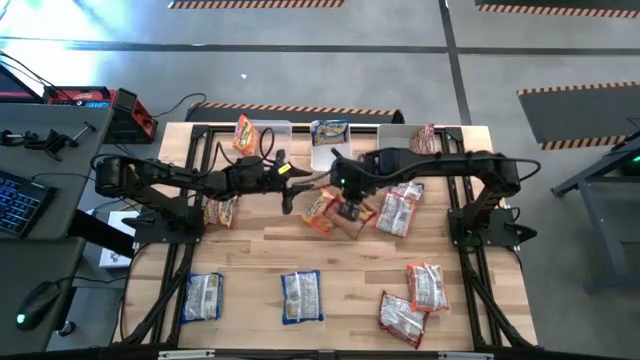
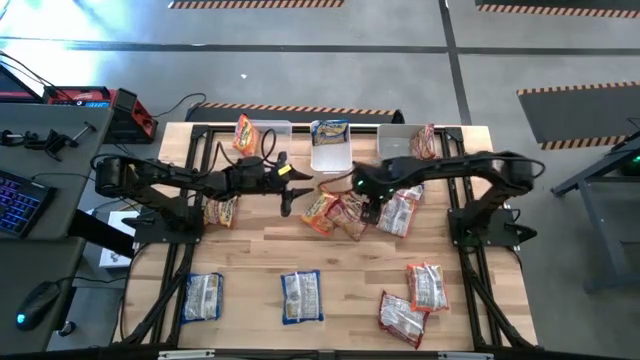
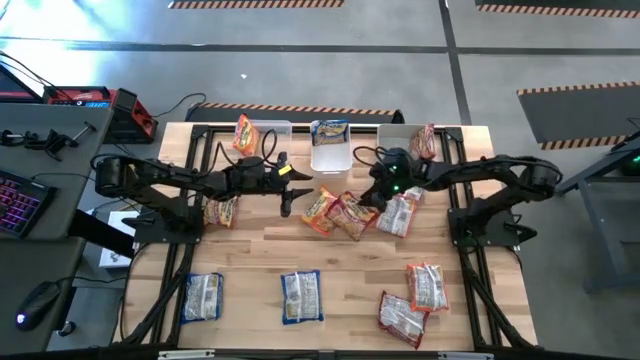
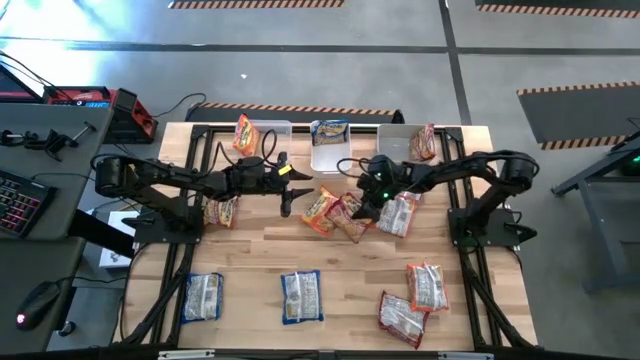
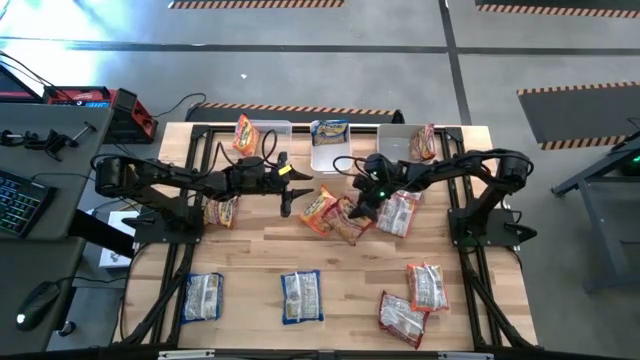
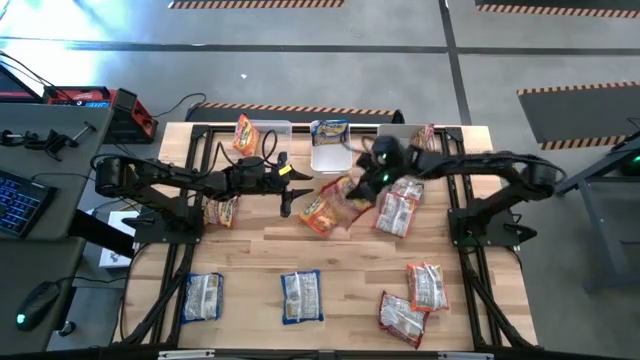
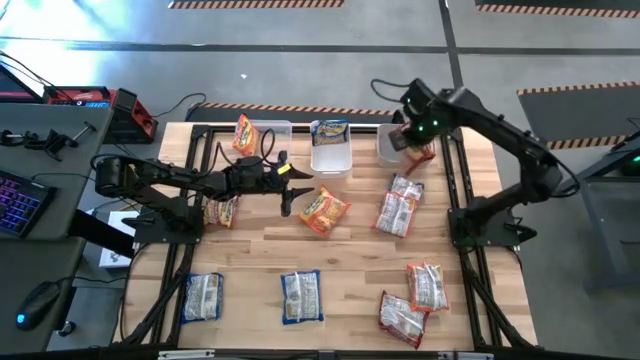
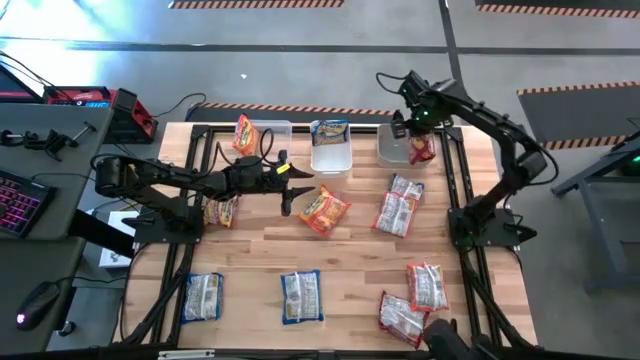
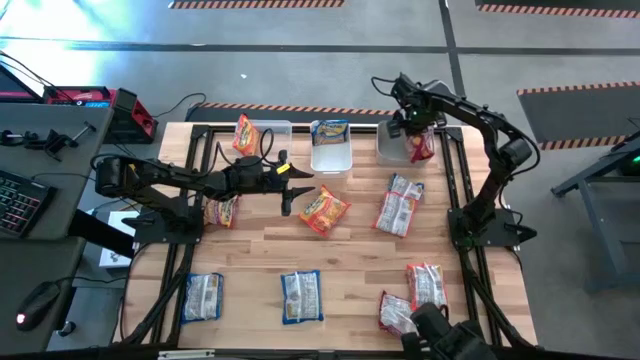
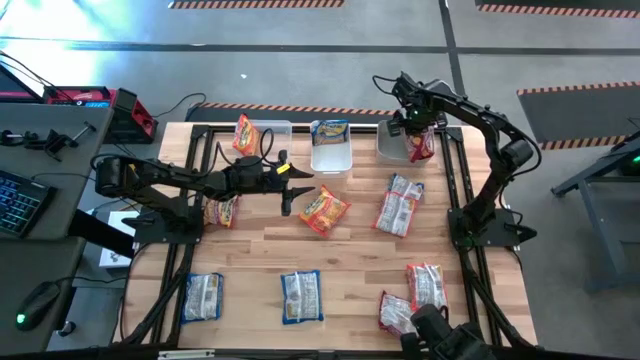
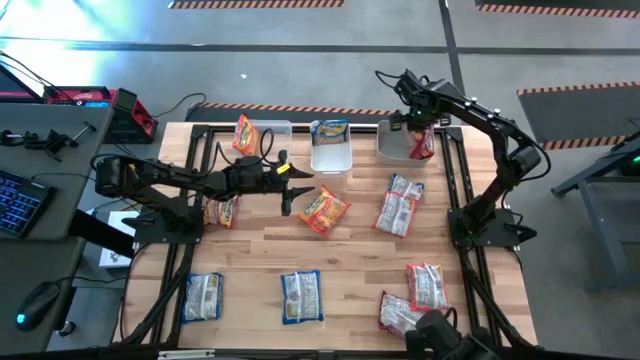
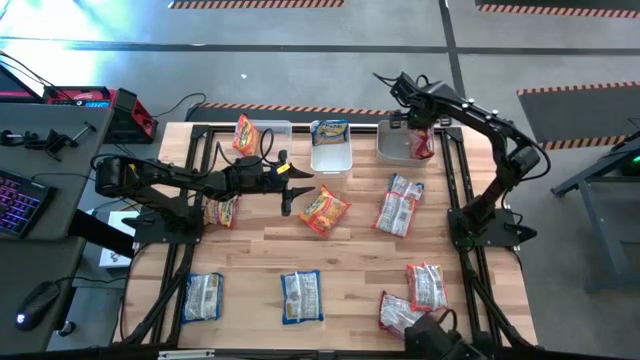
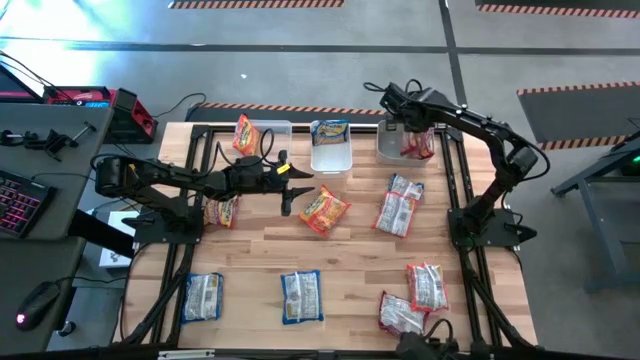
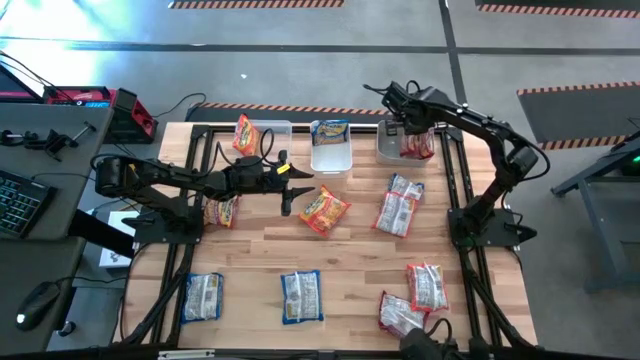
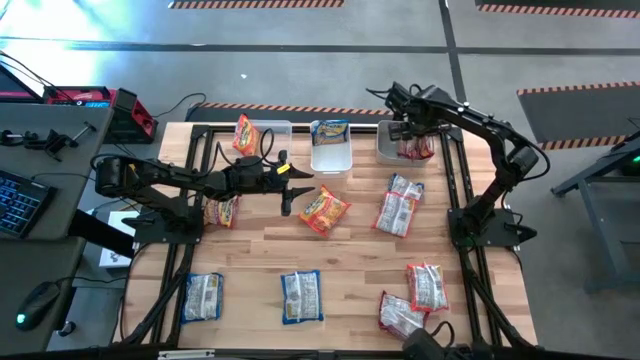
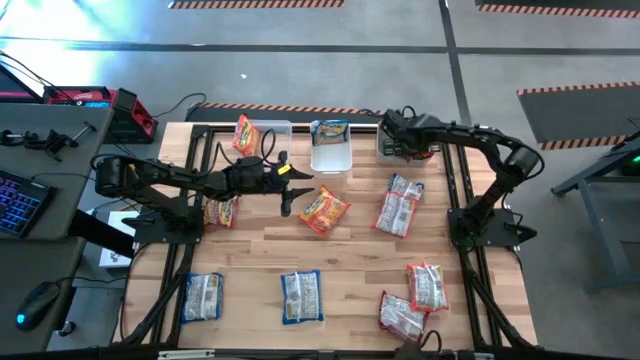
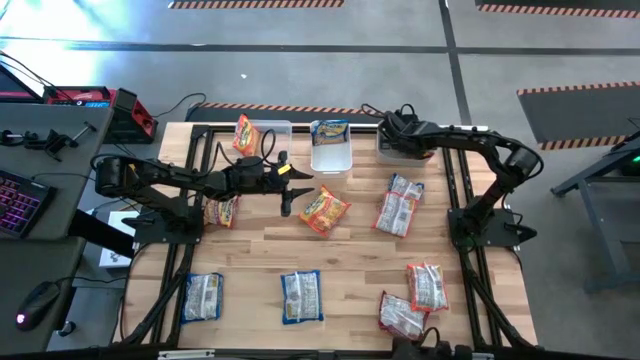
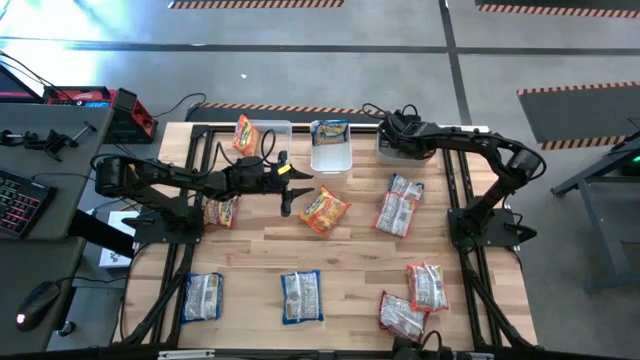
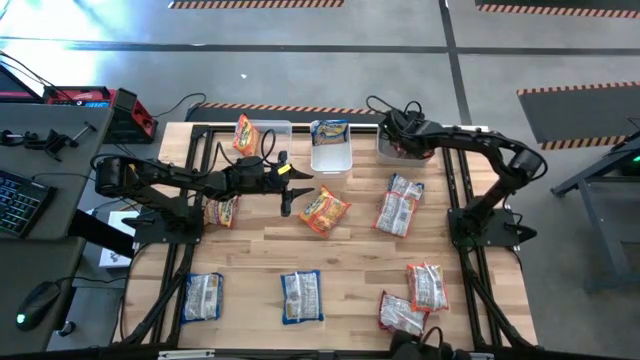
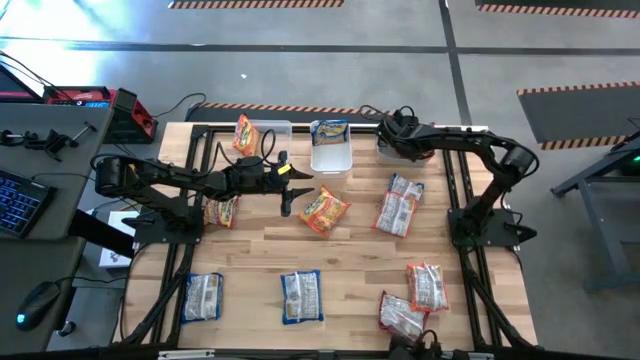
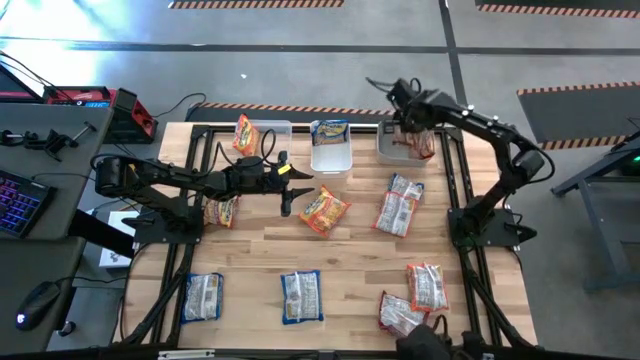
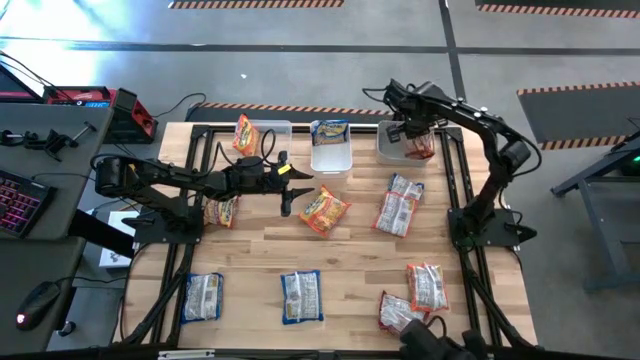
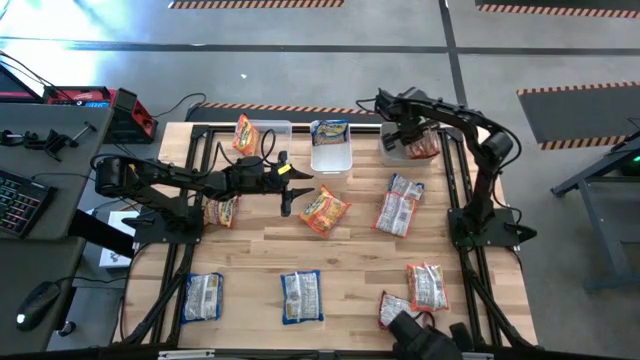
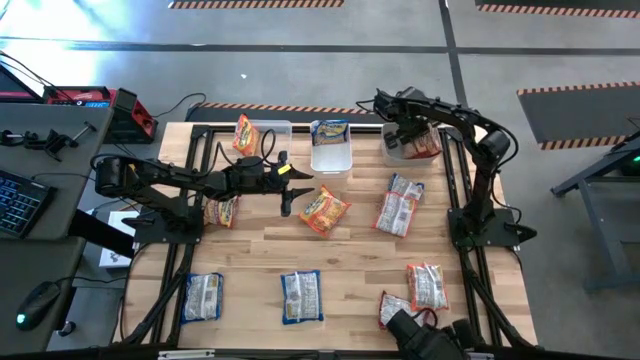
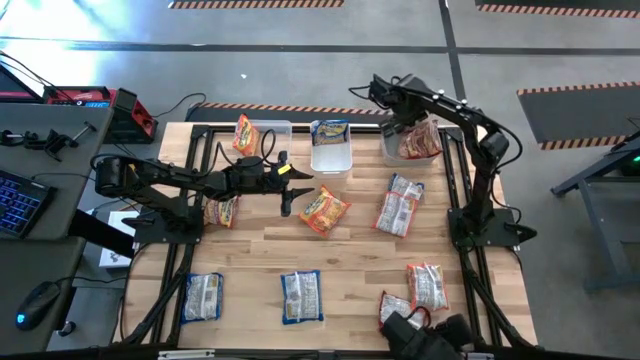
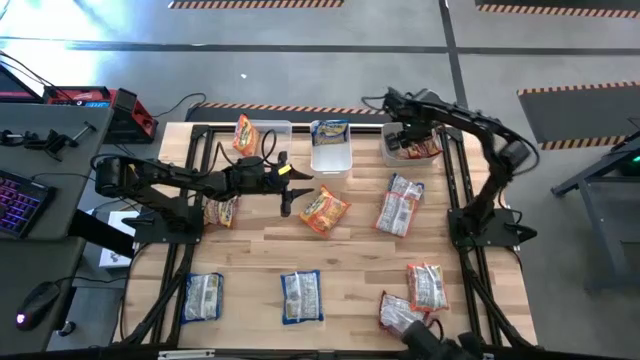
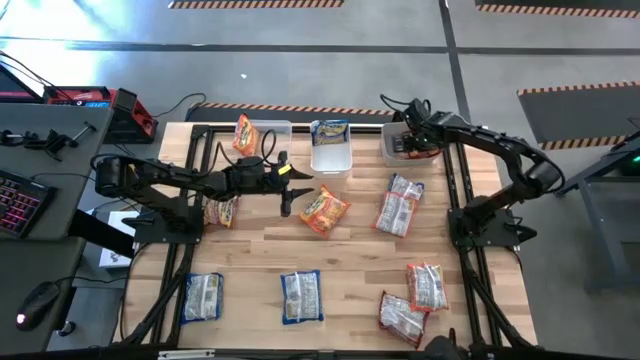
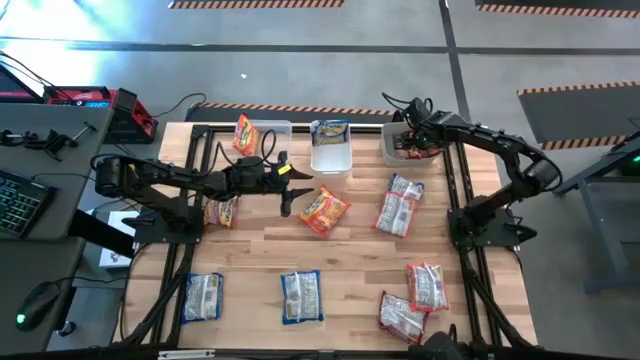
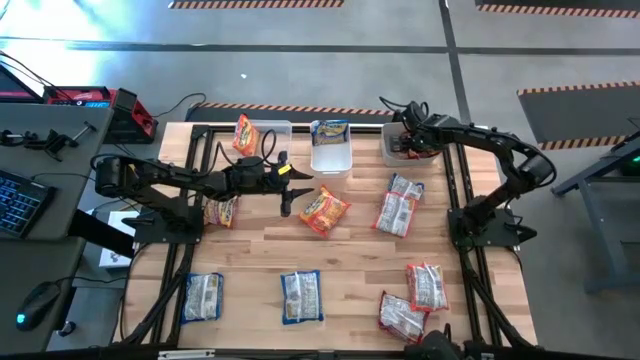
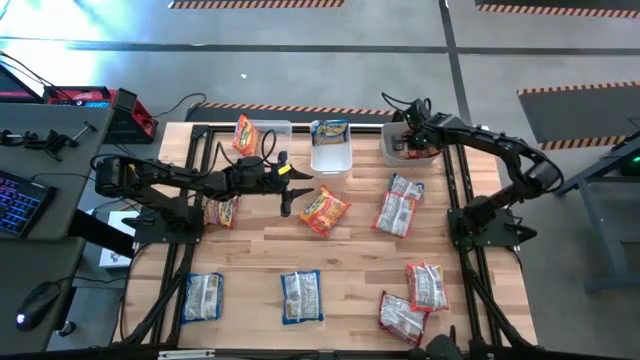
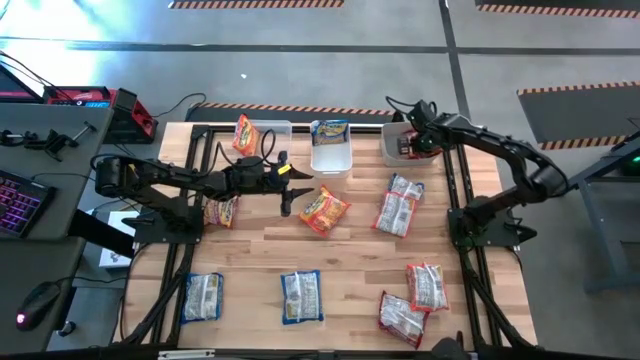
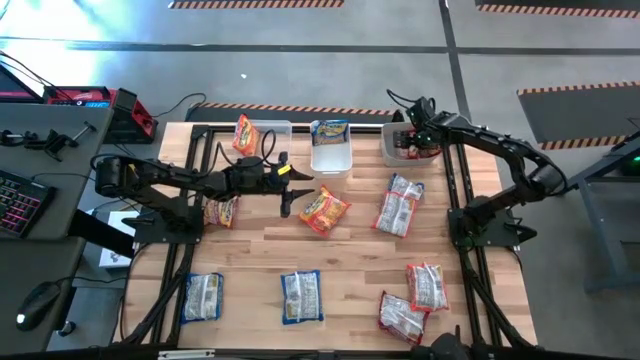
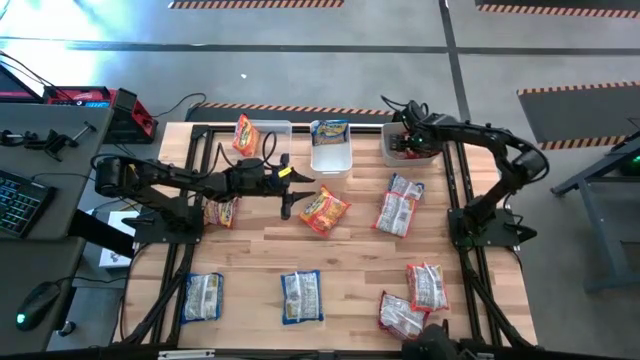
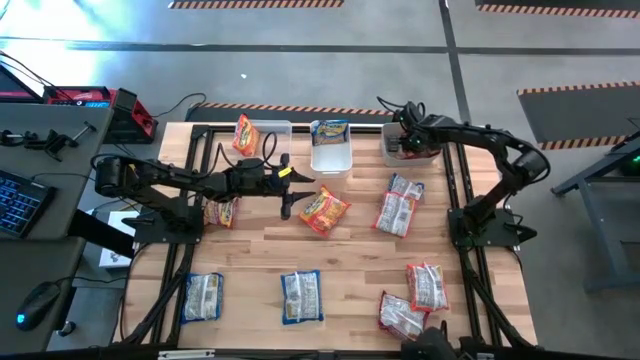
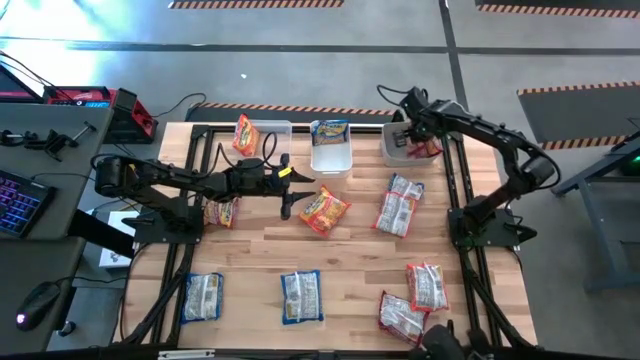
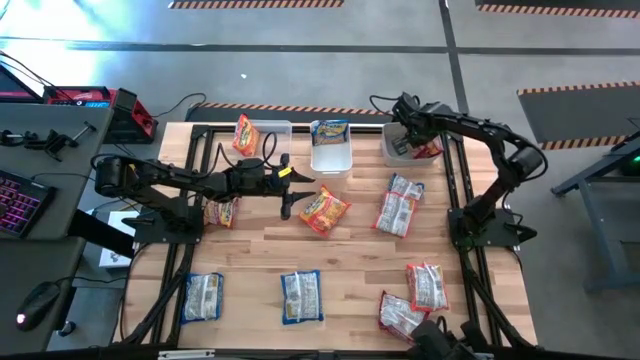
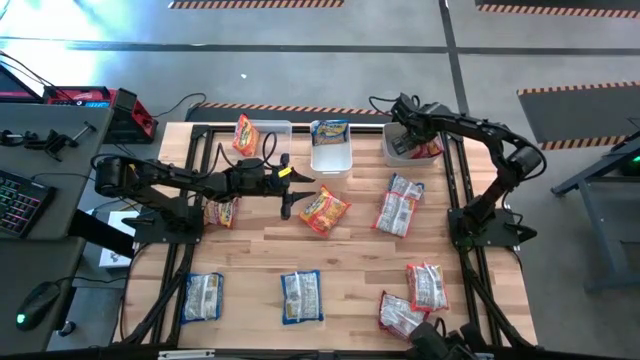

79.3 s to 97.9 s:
Task: Sort Maruchan noodles
Put the middle red noodle pack into the gray bin

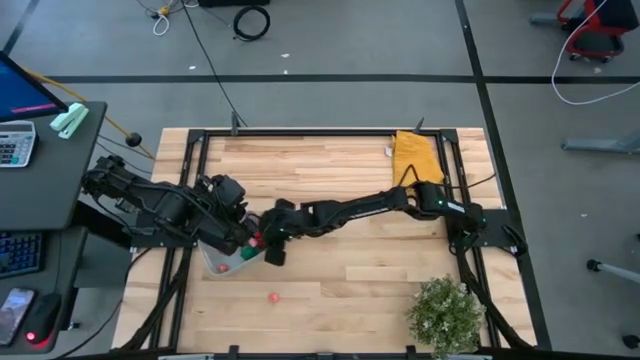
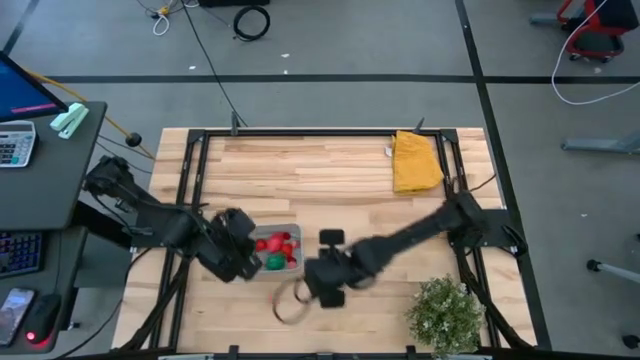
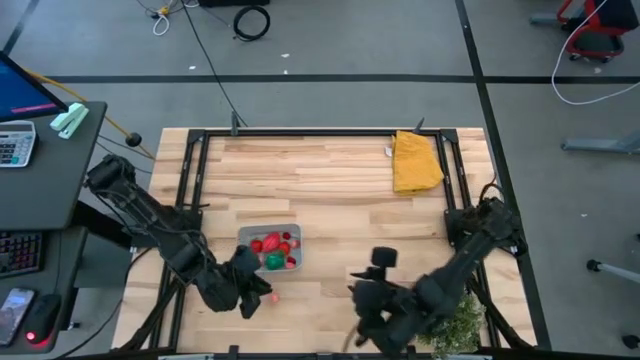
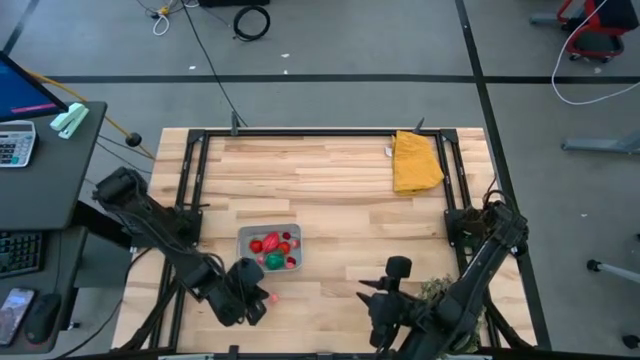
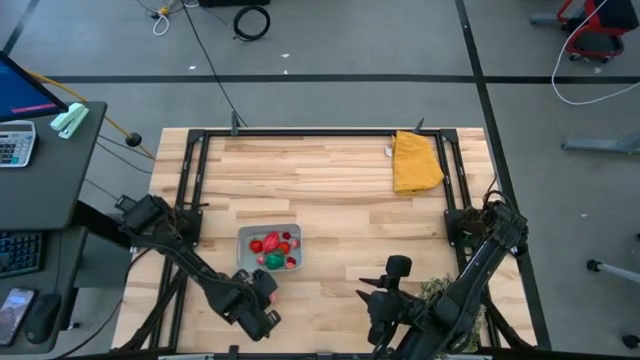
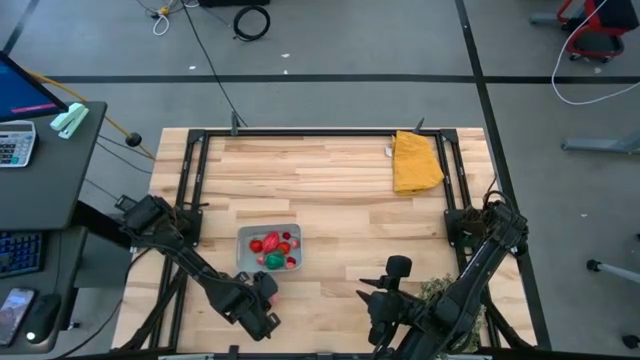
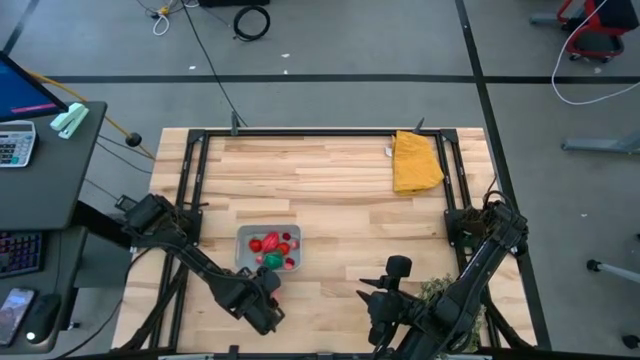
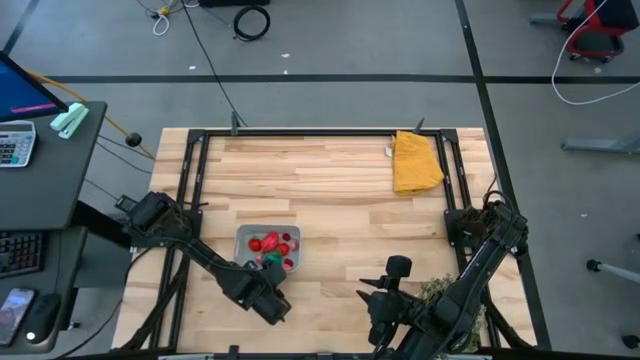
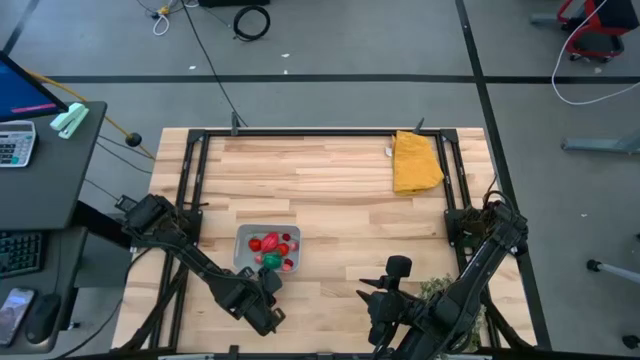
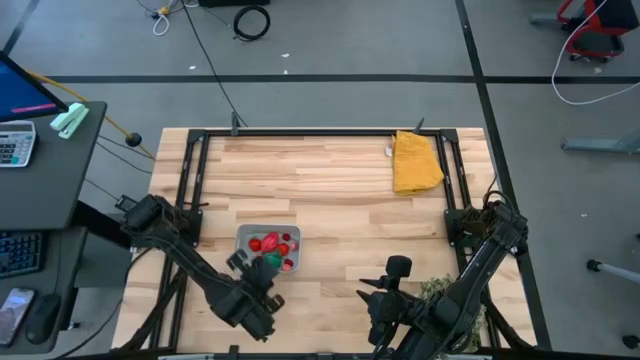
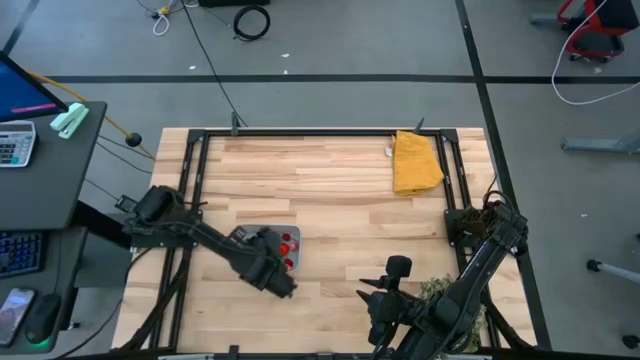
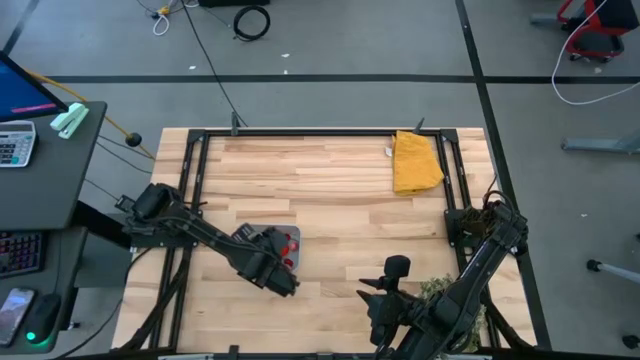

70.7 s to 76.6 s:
Task: Pick and placing Produce into tupperware
Put the pink apricot into the gray bin
